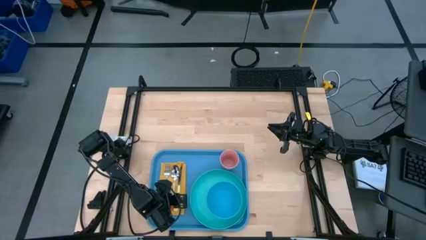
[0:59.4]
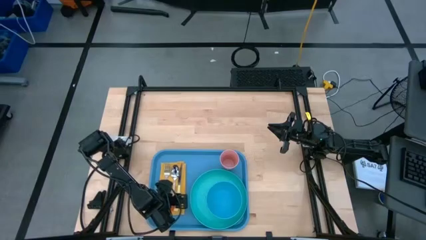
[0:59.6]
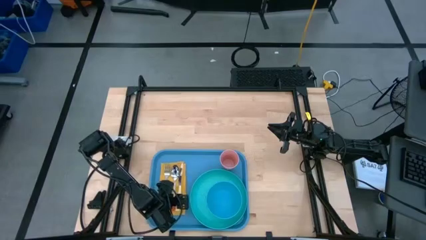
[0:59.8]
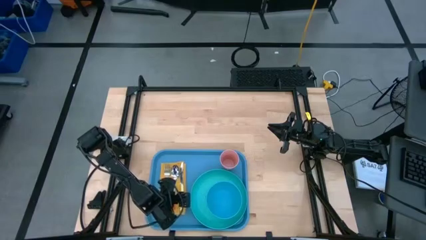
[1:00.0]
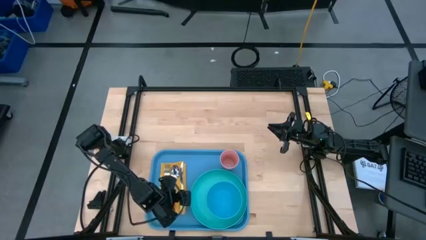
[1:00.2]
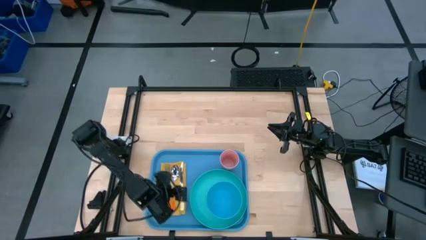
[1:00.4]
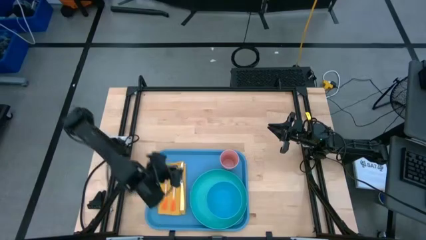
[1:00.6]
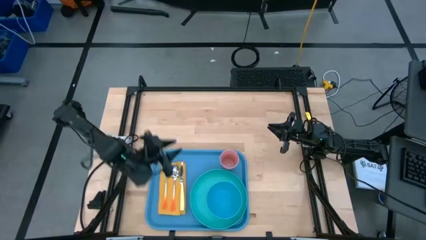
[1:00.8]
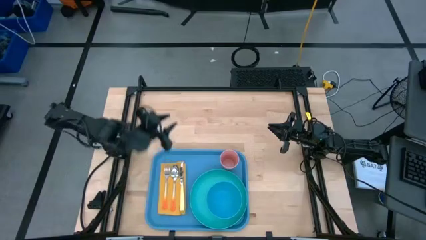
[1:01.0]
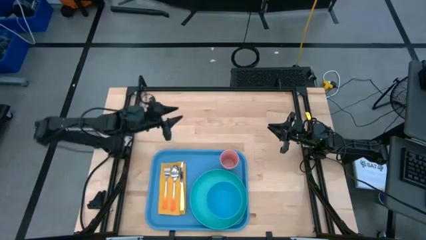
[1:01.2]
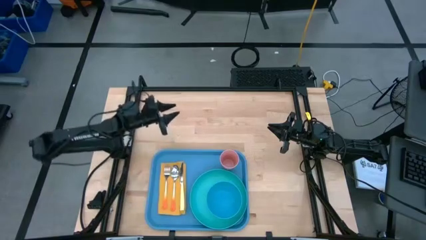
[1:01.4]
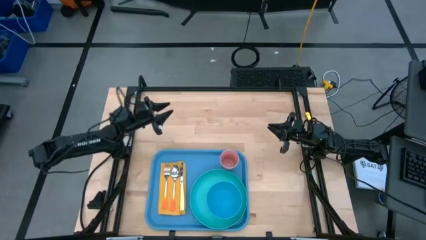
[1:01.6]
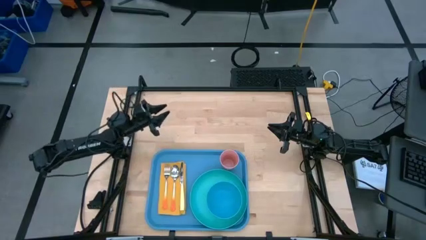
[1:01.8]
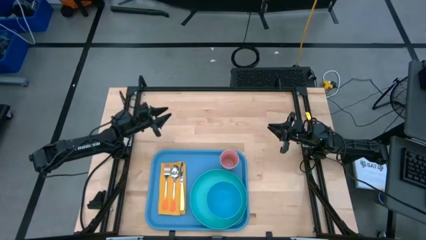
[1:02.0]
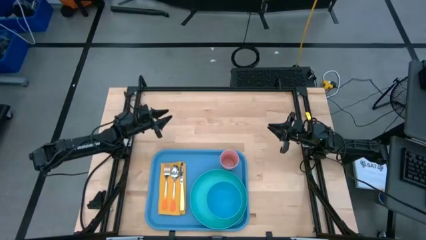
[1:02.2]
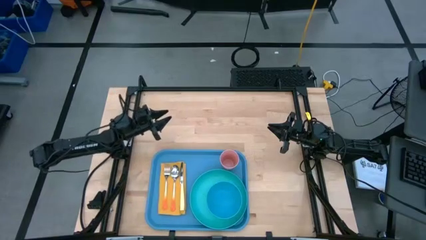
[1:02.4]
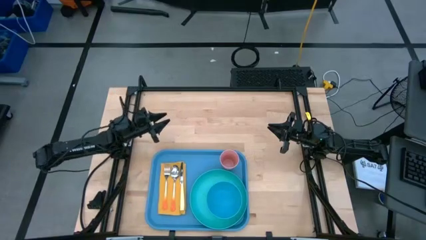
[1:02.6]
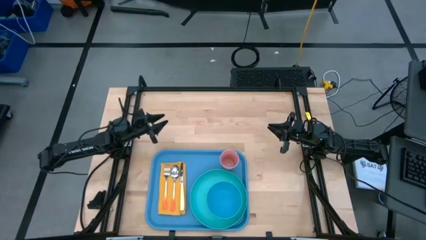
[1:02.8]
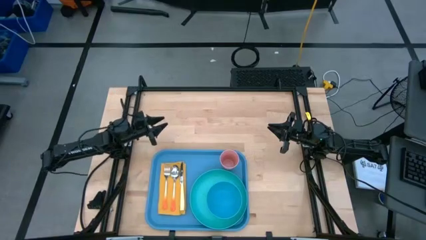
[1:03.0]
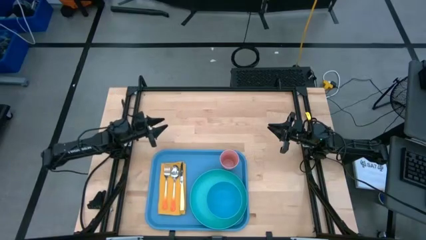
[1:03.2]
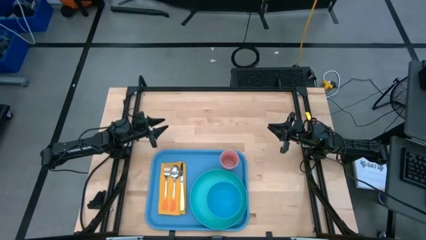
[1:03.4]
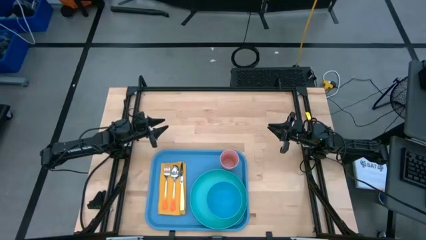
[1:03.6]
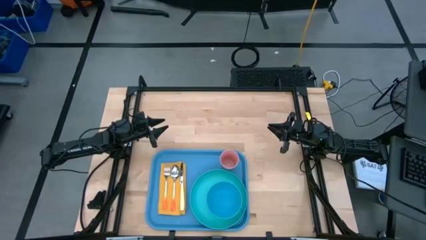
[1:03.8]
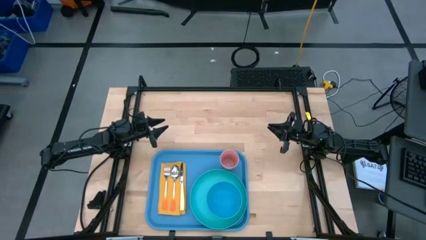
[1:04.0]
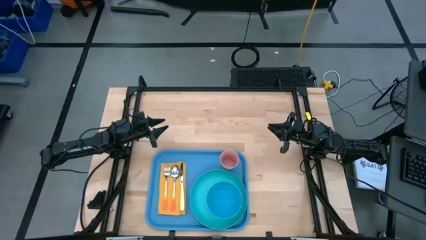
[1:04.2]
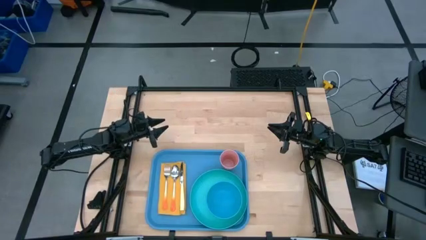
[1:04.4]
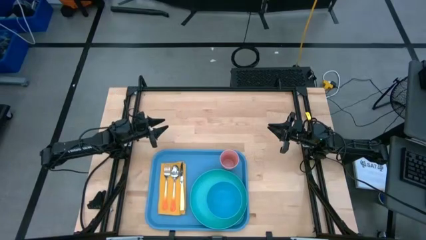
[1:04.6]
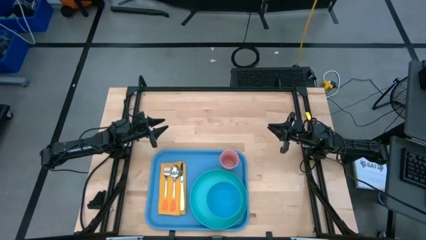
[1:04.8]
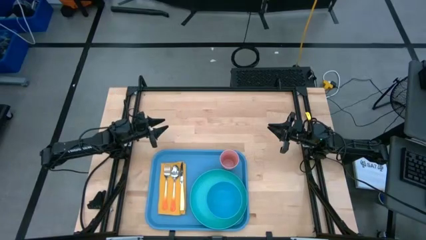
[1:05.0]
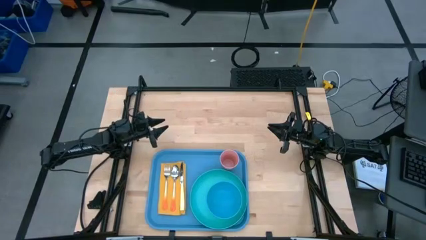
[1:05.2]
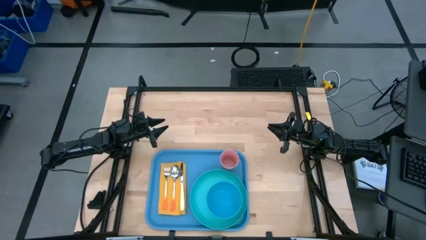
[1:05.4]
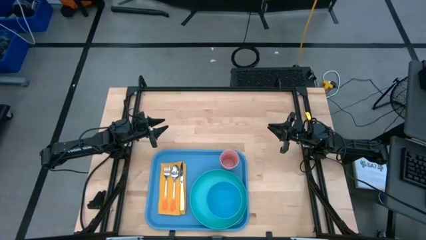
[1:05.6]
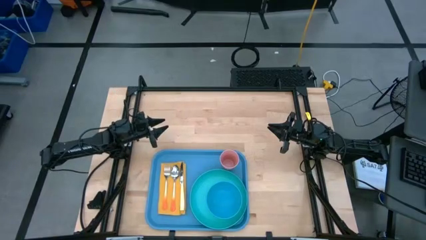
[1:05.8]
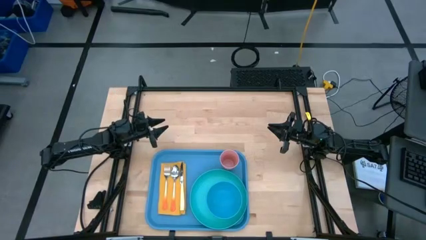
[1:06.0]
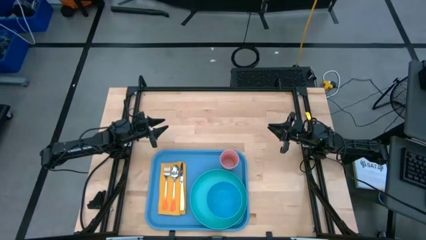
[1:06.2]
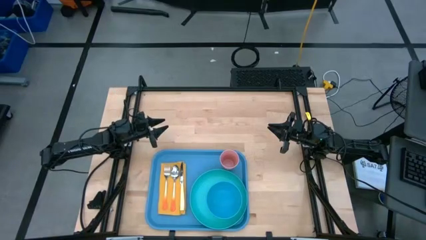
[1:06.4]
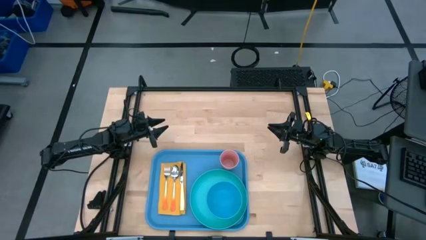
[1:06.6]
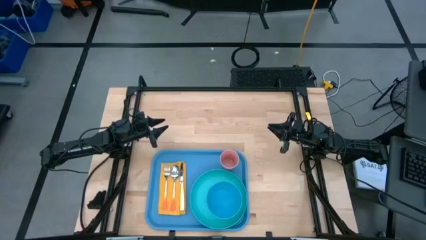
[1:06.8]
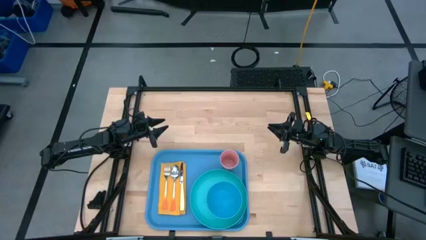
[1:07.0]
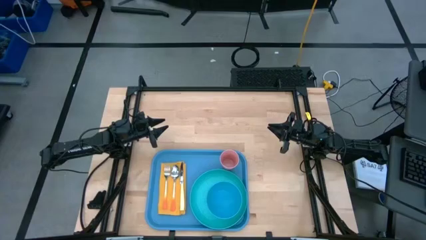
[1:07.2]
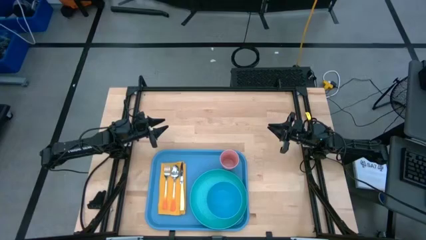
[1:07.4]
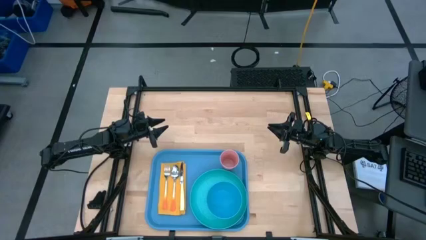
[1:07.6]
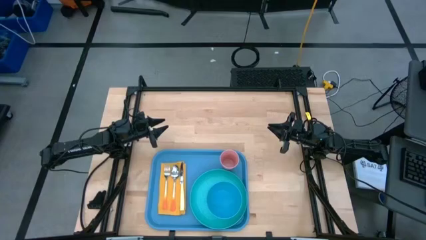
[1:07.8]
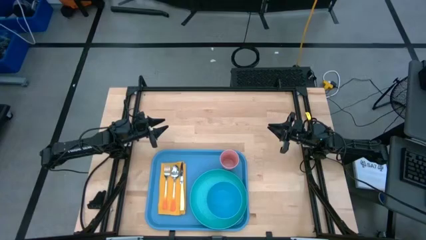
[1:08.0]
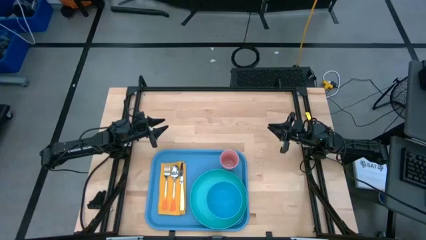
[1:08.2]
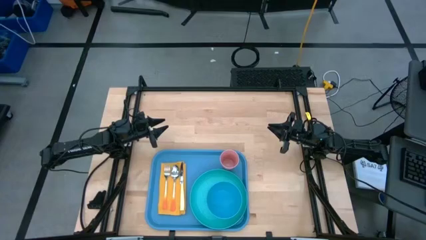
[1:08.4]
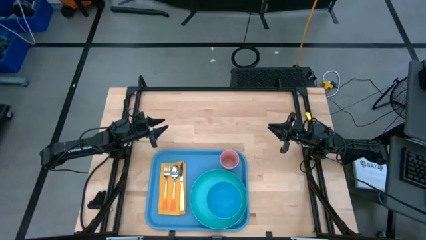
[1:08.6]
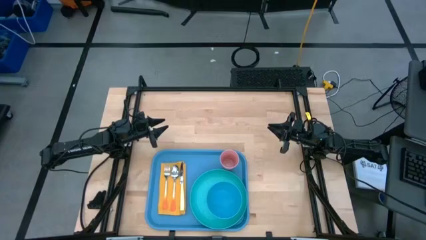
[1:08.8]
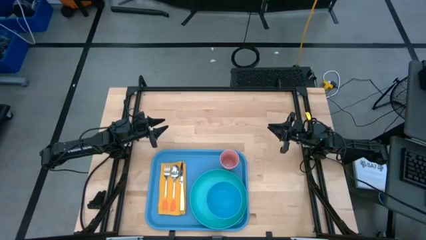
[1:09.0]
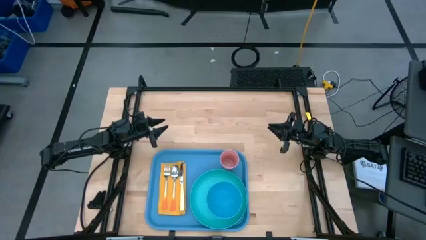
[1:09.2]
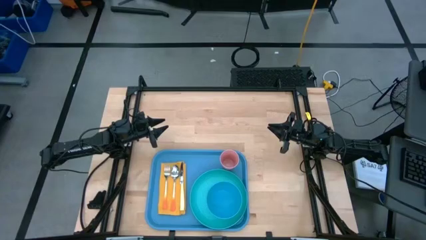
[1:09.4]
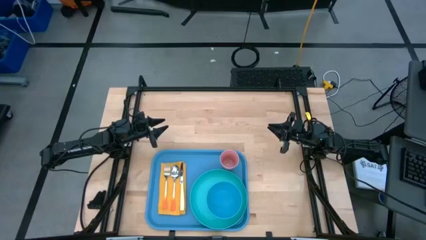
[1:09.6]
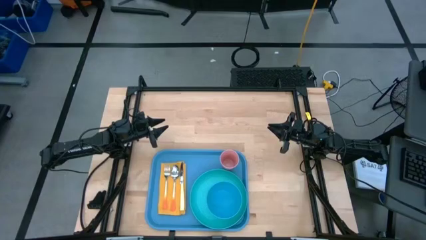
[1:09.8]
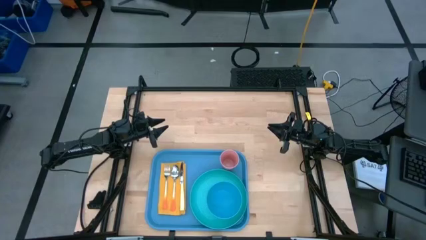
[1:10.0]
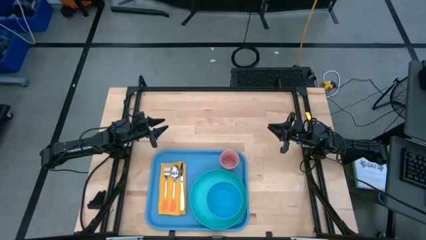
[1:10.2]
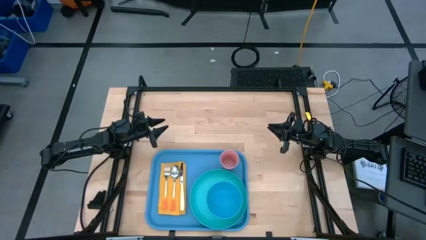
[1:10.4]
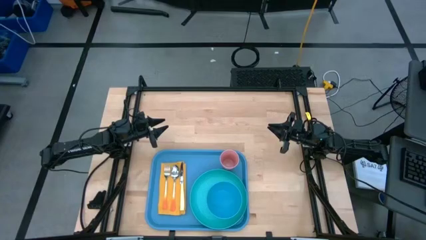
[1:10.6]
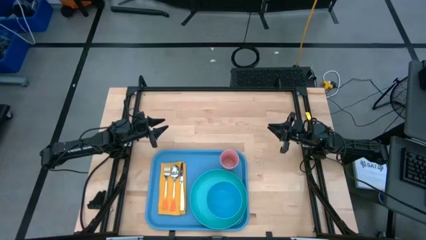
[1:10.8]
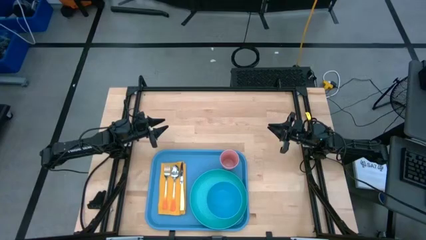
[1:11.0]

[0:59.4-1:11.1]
Task: Set up tray
Return to Home Position

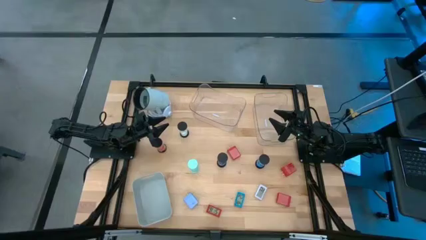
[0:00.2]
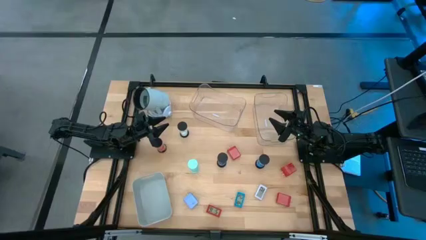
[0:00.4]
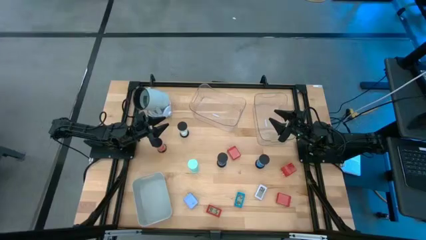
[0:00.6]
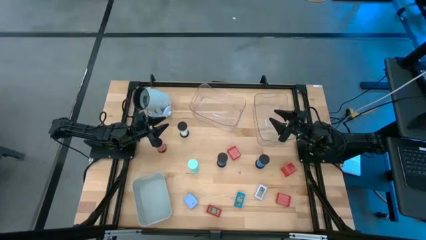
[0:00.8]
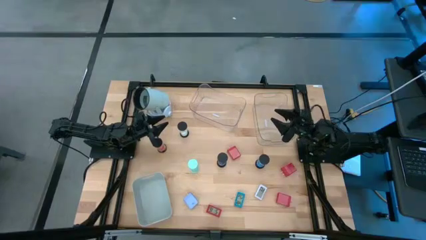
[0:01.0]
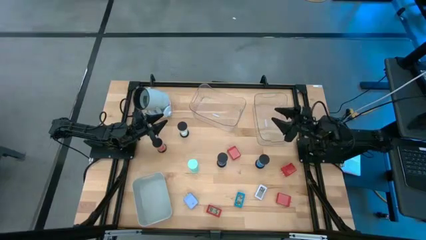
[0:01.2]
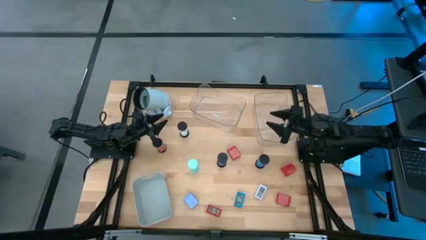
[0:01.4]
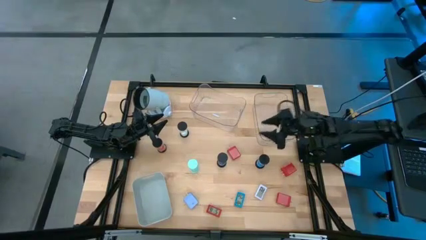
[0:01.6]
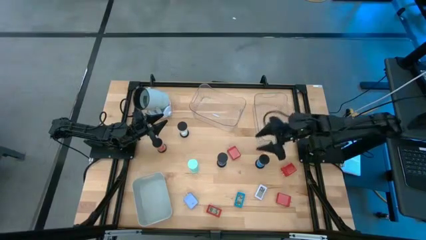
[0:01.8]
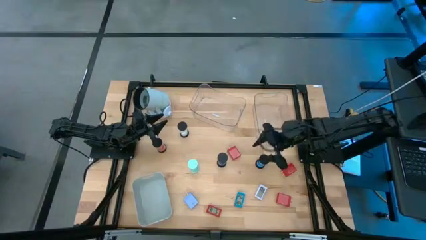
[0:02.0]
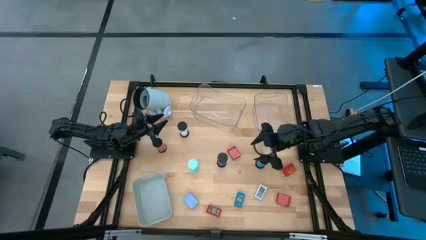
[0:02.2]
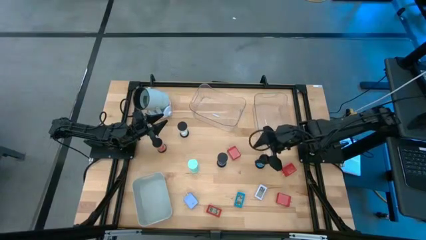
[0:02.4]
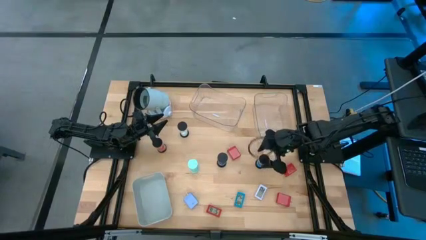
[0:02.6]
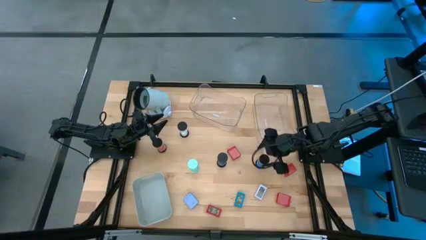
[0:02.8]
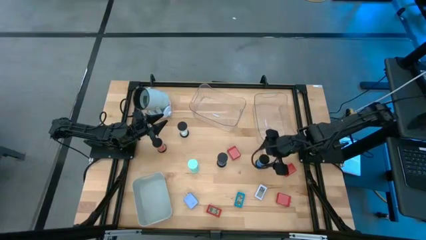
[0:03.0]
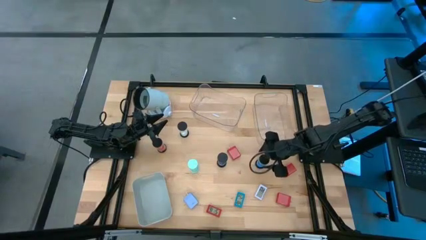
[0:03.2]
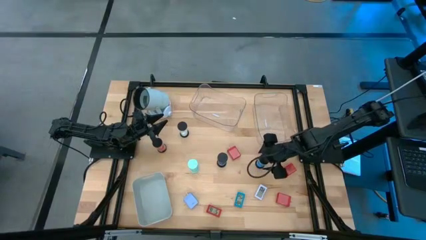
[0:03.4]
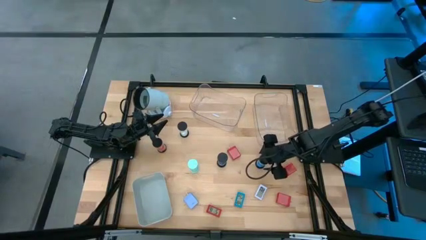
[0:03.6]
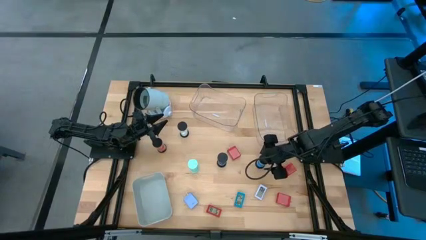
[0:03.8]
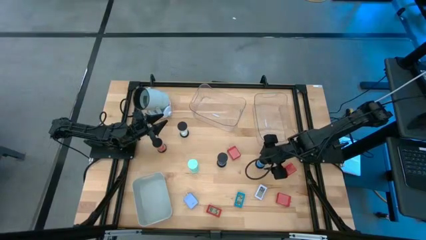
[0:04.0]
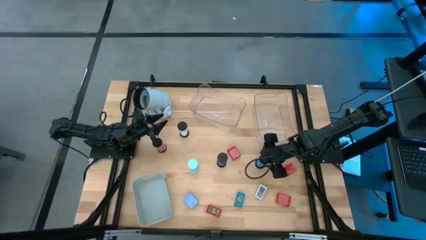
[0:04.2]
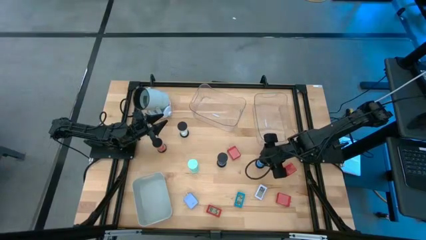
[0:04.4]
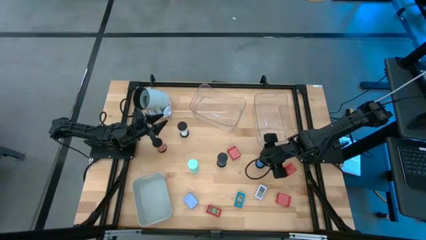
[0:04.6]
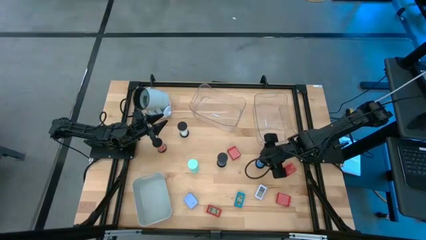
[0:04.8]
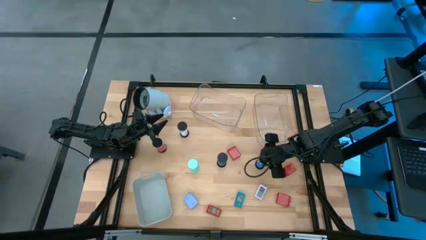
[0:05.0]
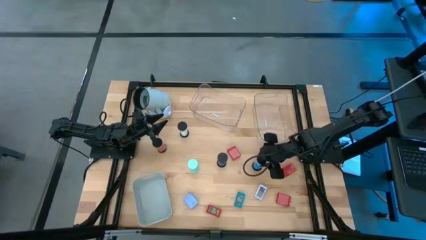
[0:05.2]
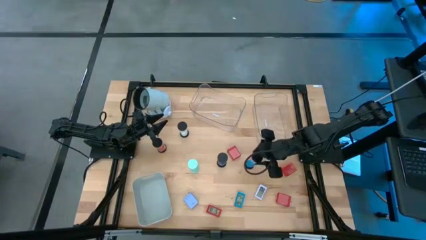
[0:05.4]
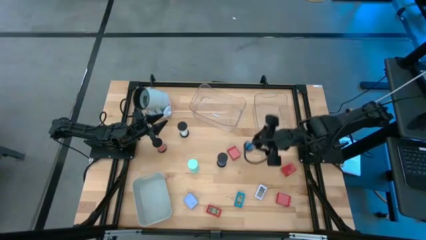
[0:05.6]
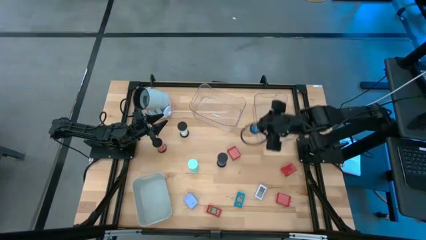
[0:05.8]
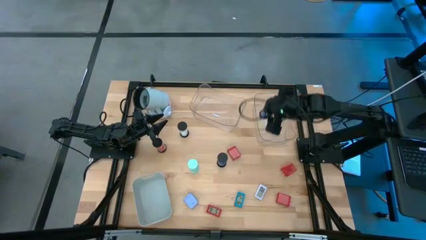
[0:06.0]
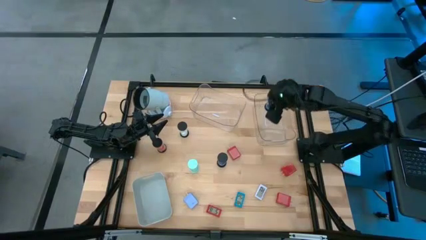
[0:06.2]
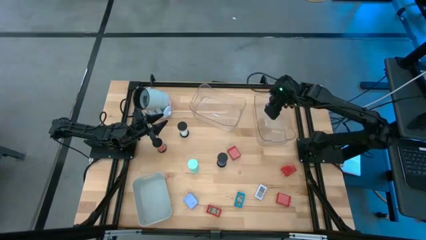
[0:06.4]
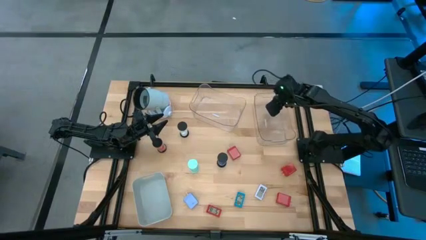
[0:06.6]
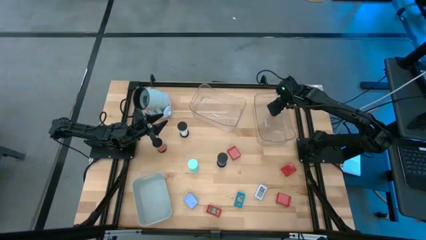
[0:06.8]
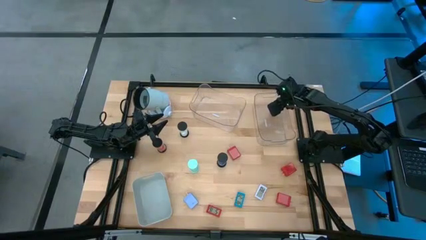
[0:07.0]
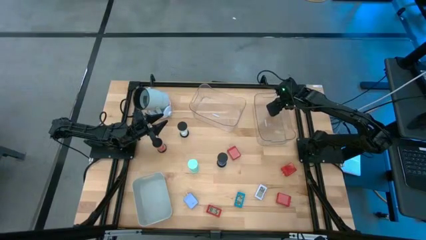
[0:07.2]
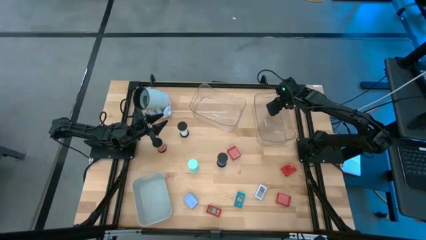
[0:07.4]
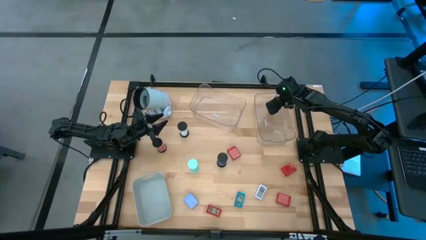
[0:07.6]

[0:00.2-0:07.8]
Task: Pick & Place Office items
Put the light blue hourglass into the right transparent bin
